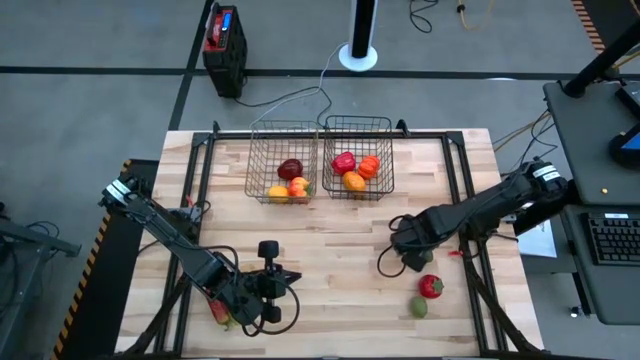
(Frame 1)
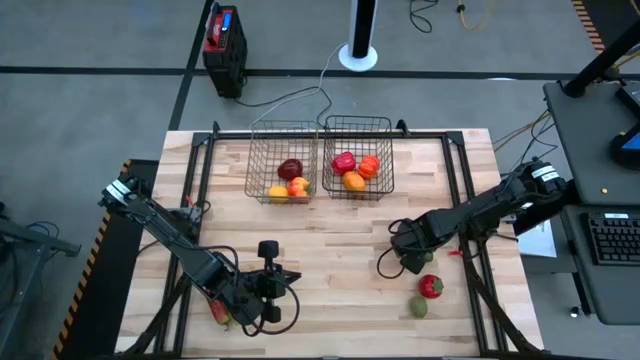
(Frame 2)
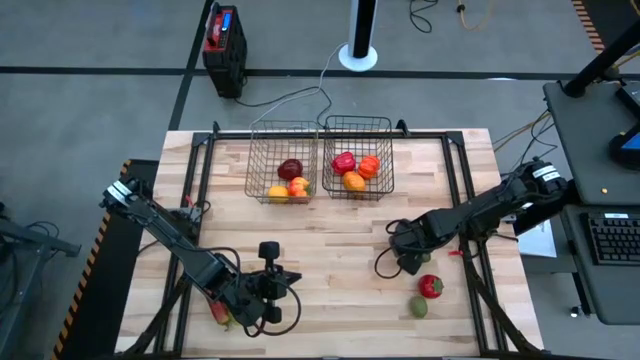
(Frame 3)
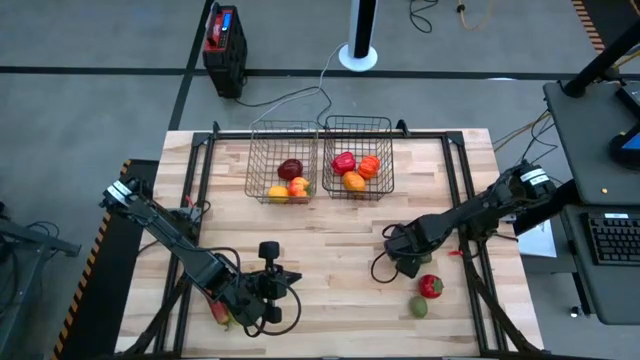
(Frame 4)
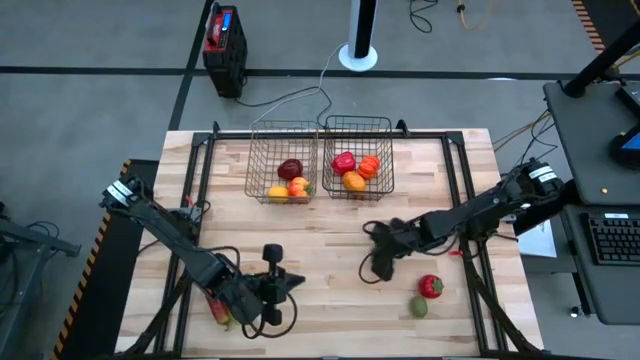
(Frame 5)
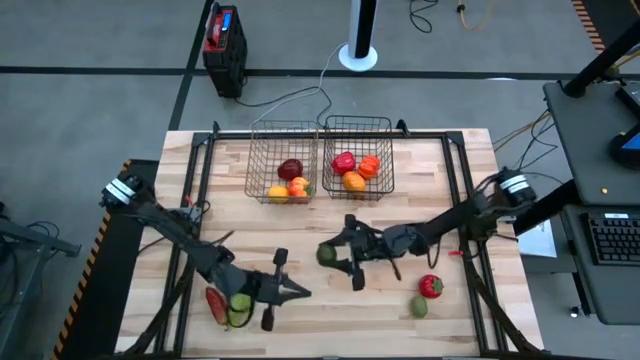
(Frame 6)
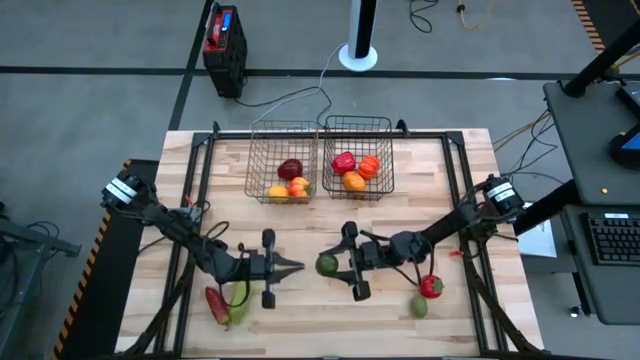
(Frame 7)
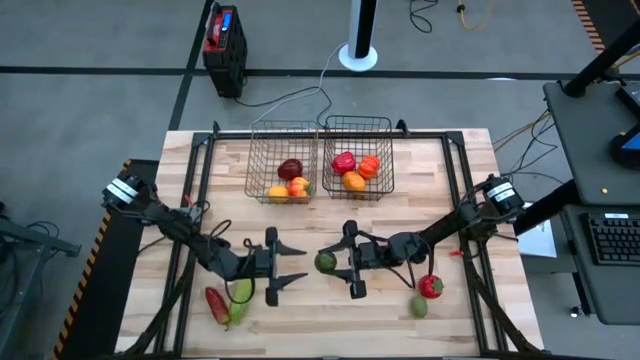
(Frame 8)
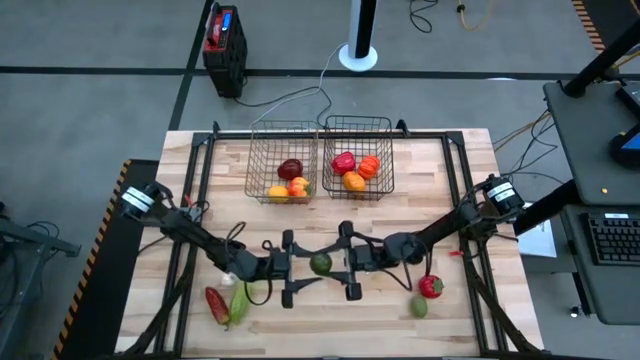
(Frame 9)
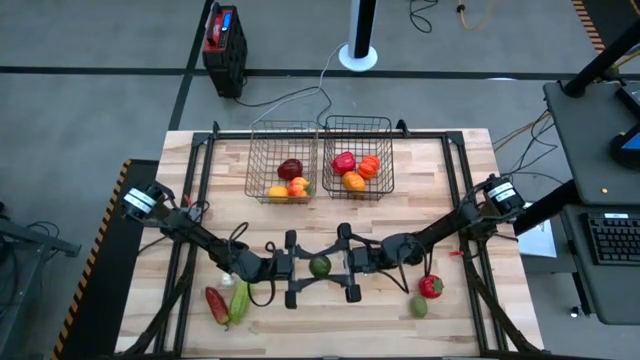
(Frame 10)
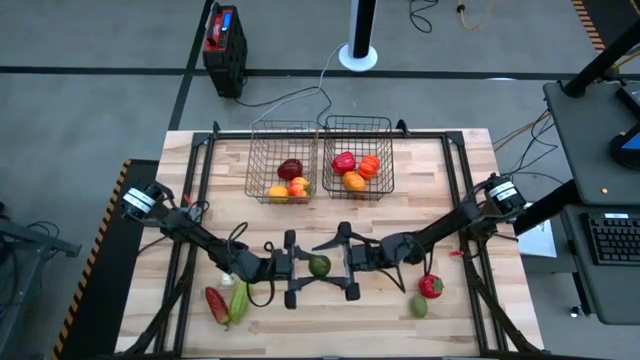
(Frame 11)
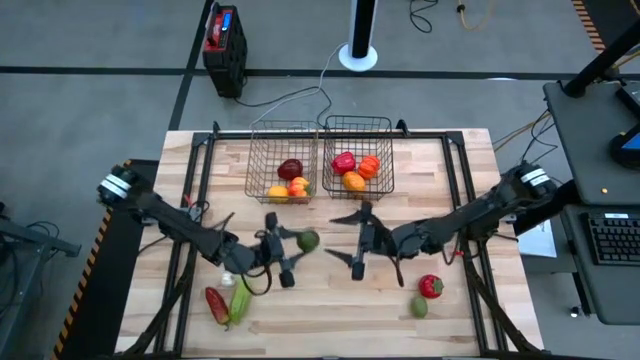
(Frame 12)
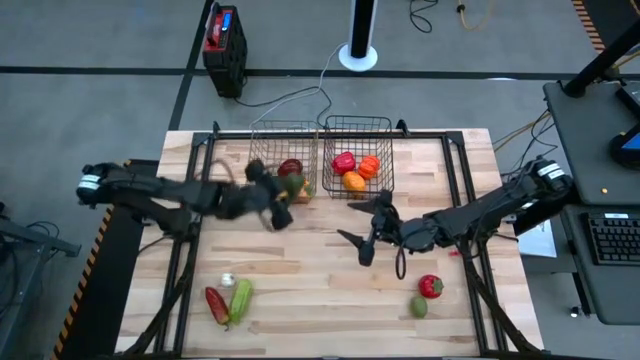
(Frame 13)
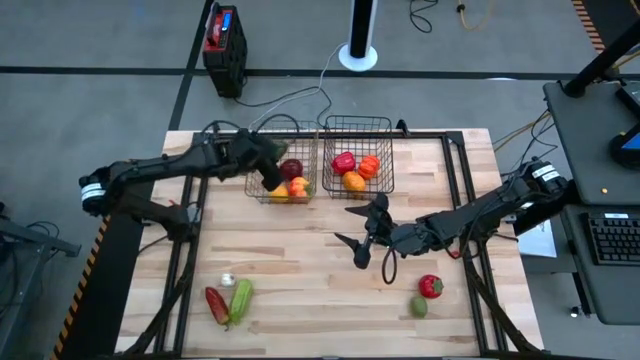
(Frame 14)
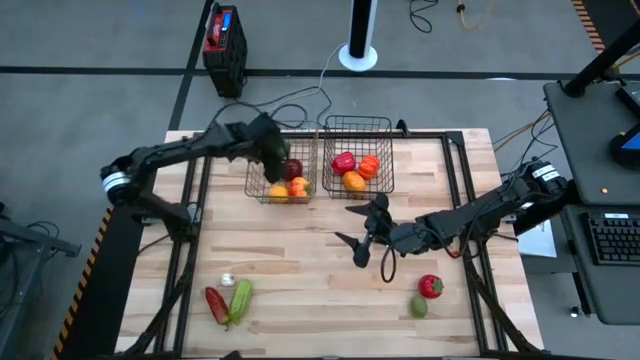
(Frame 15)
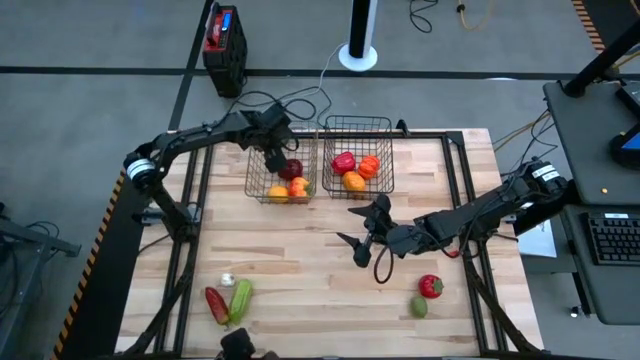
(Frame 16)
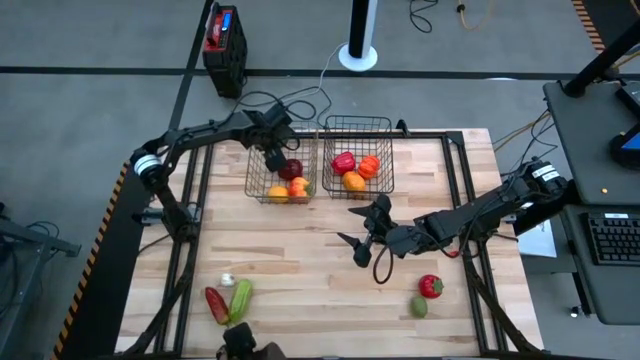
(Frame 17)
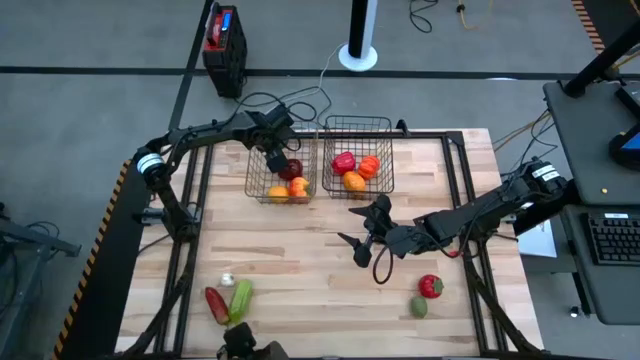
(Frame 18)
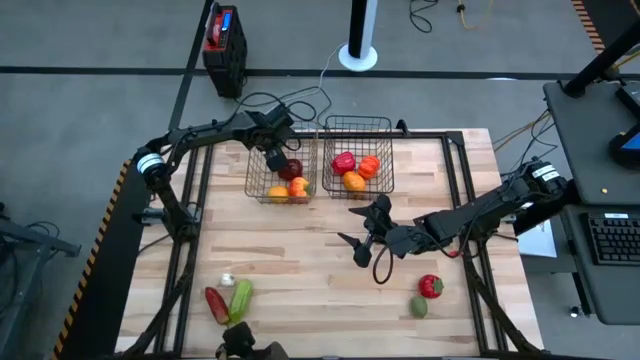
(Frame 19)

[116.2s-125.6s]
Task: Sort produce into baskets
Put the top green lime into the silver wire basket

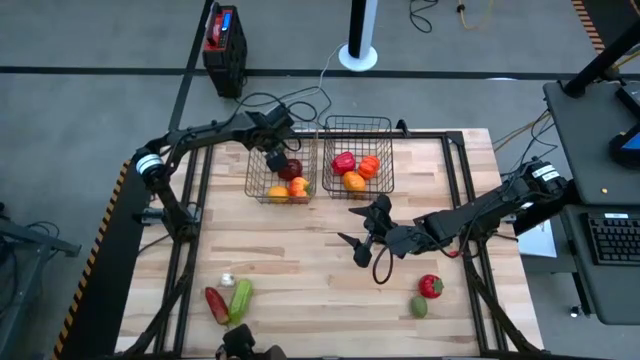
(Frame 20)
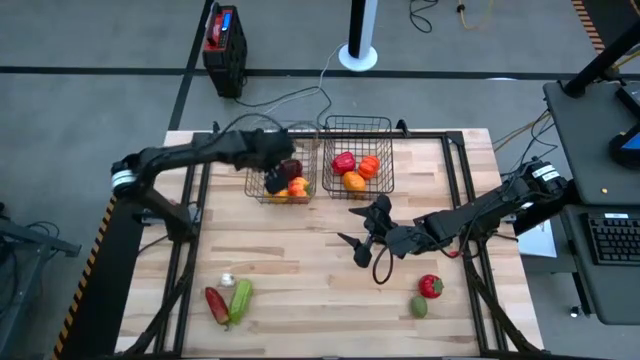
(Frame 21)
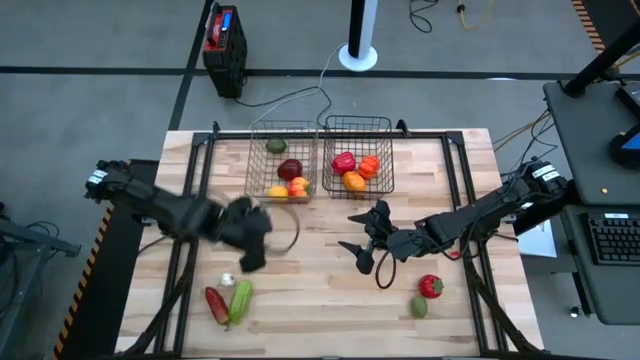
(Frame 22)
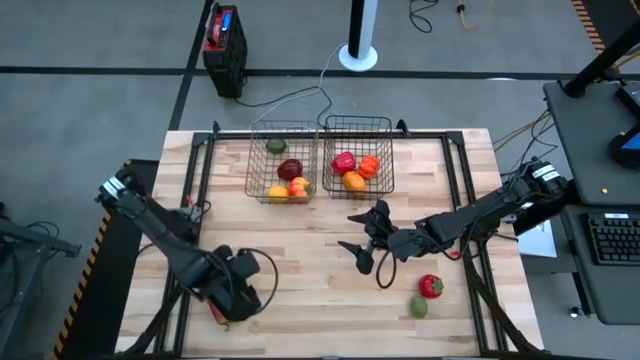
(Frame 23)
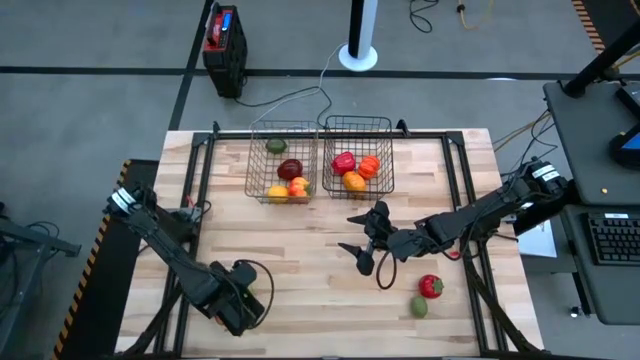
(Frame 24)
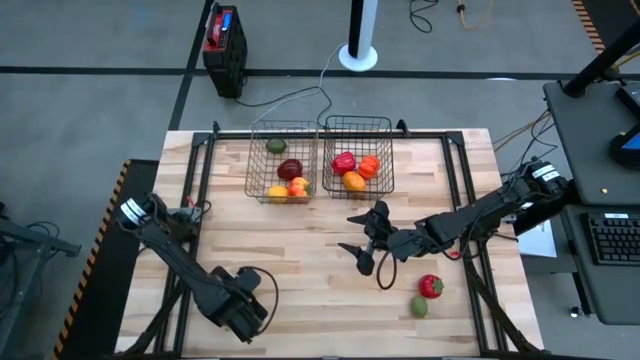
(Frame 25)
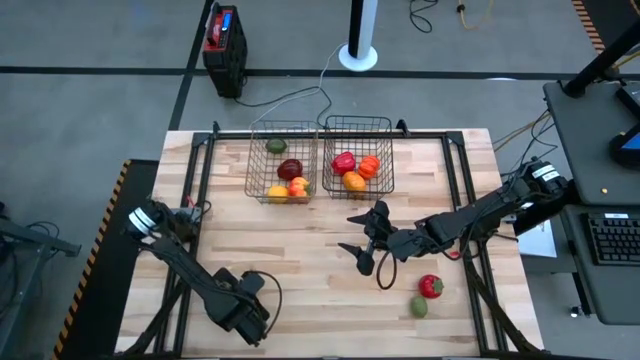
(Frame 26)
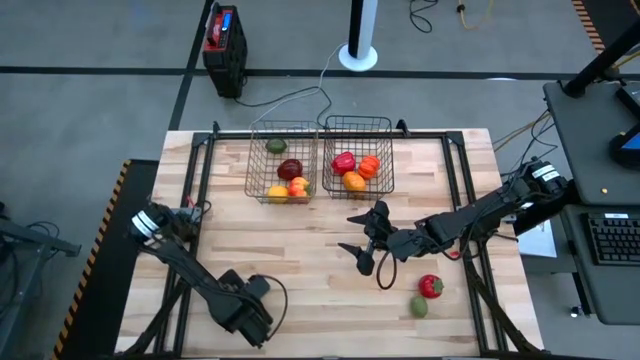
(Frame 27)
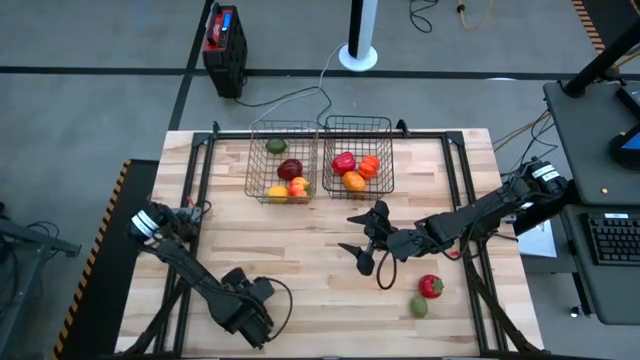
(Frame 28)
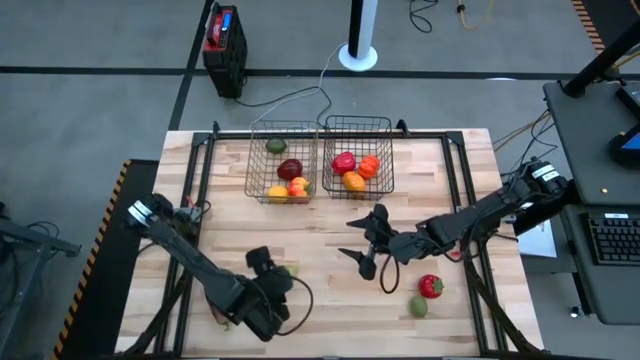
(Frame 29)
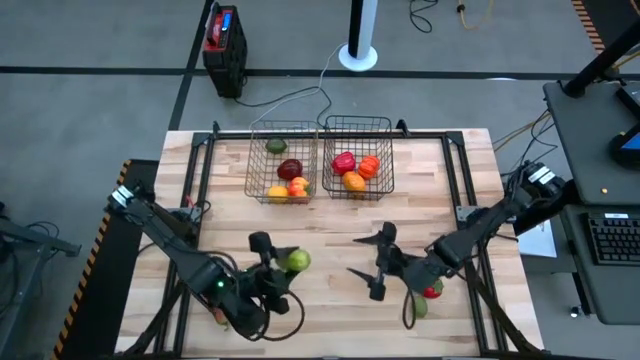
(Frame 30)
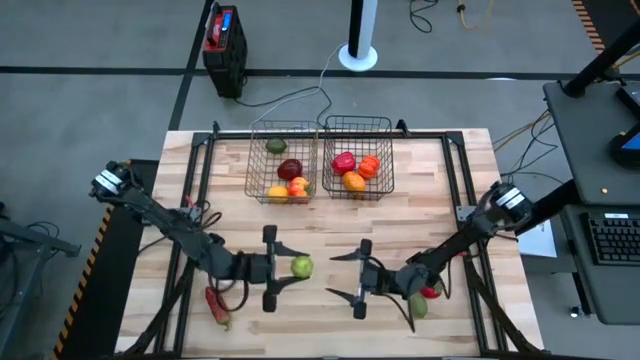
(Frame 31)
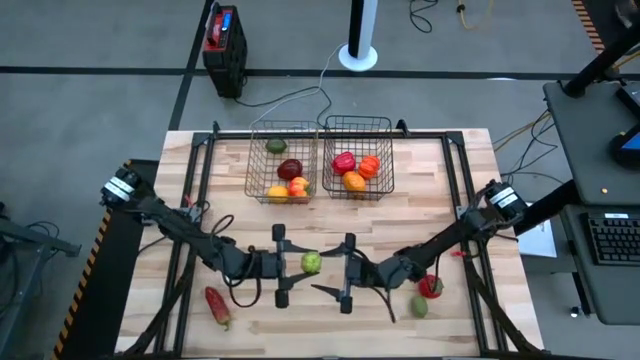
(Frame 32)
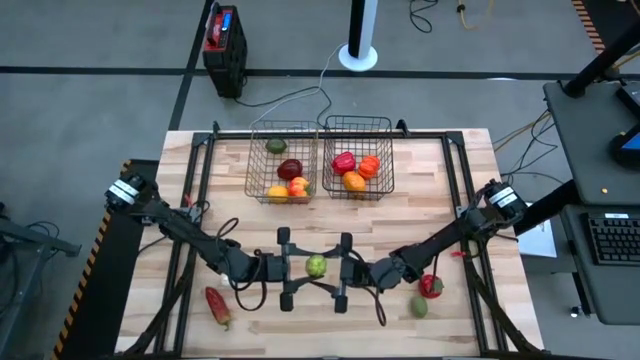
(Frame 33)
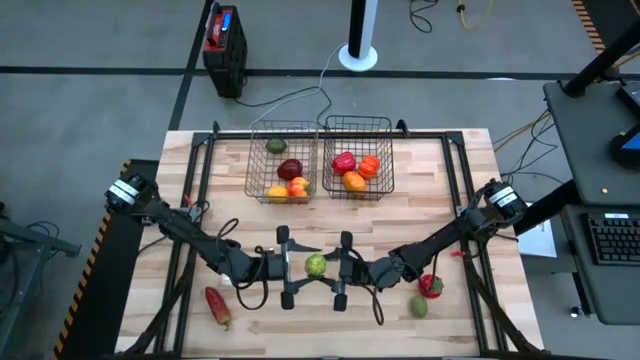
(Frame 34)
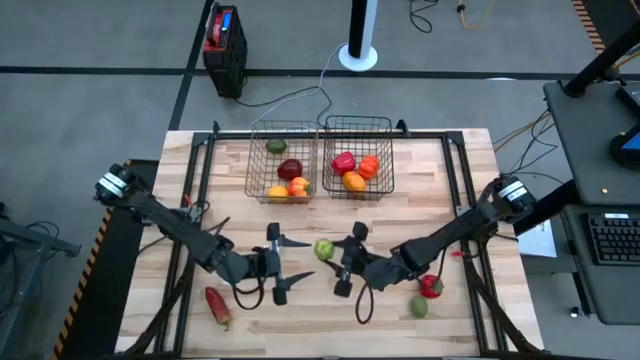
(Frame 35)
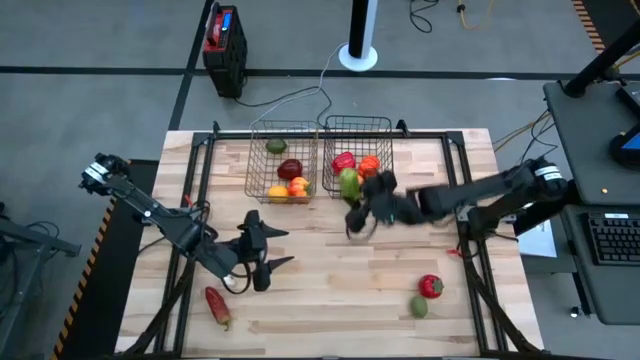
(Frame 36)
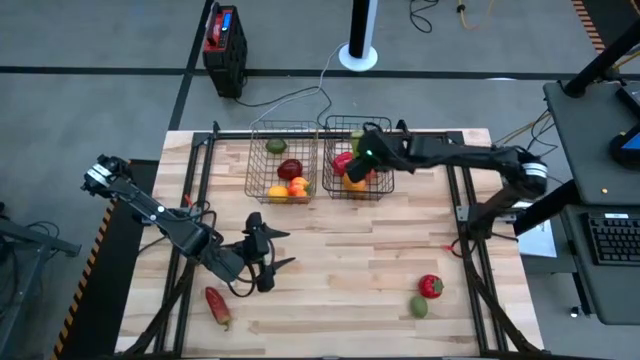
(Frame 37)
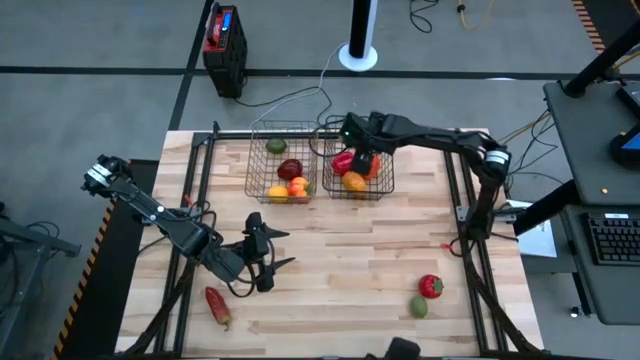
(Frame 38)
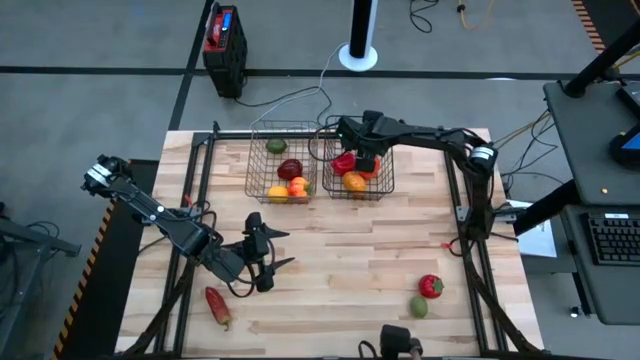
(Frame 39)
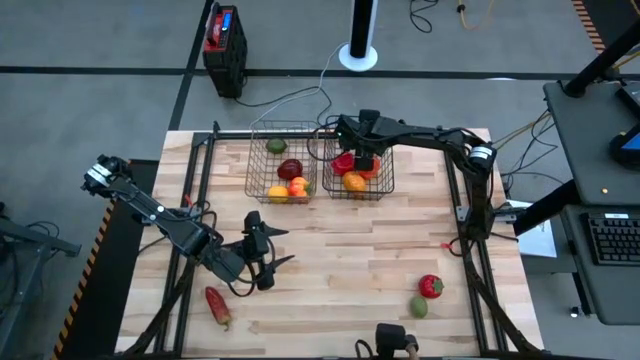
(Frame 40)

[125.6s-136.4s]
Put the green cucumber into the black wire basket

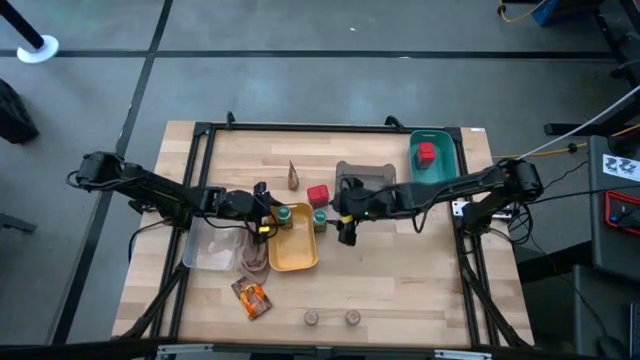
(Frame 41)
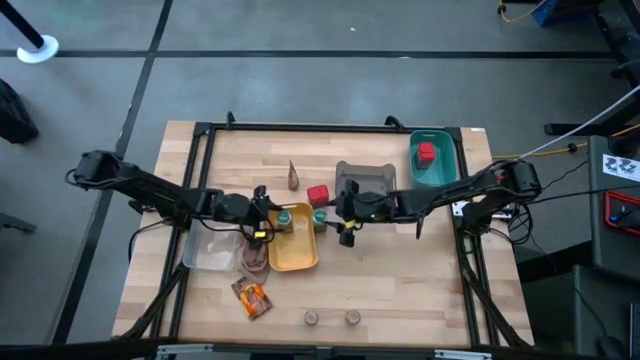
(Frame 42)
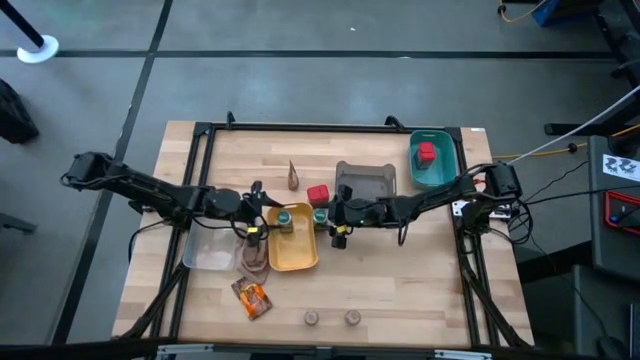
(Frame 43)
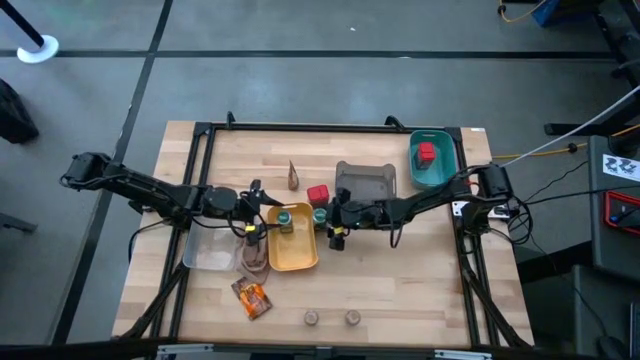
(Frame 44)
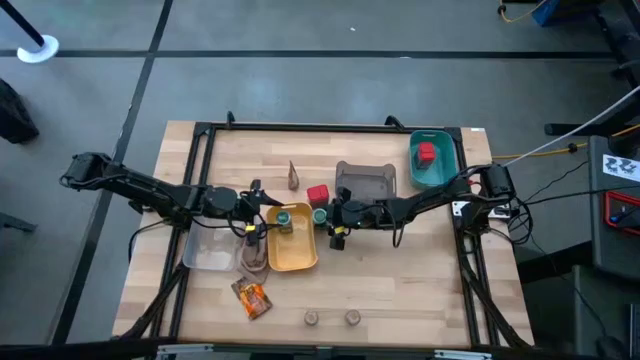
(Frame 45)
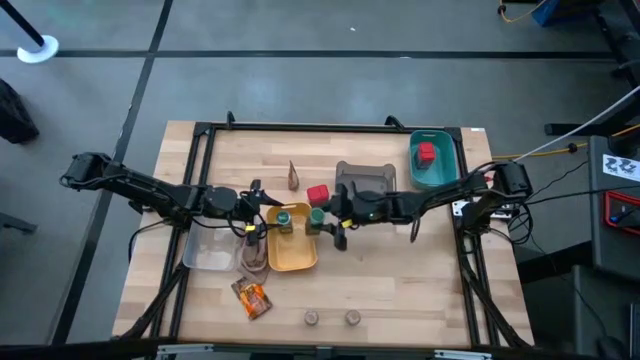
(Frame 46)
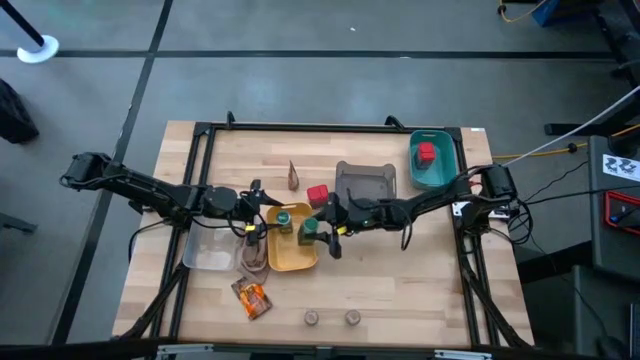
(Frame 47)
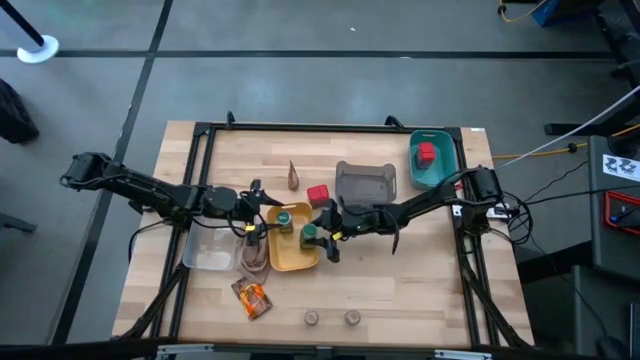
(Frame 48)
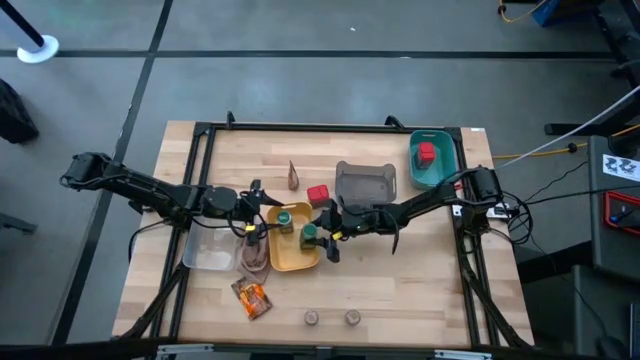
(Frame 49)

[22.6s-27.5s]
Task: Sort spices by type
Put the green seasoning bottle into the yellow bin
